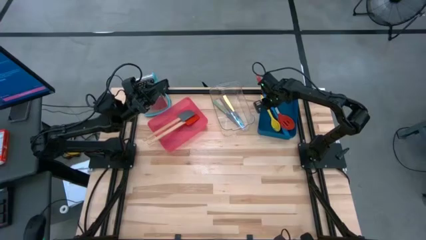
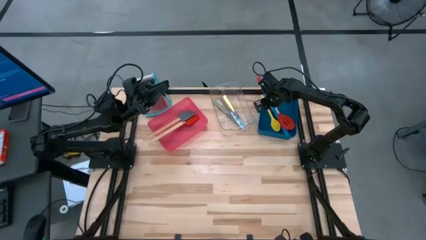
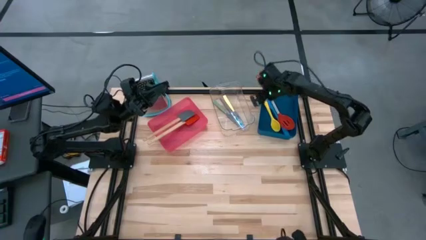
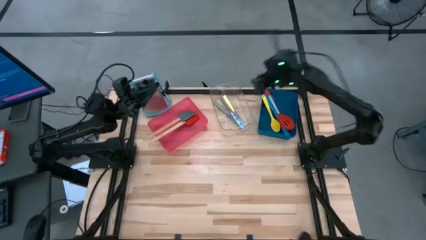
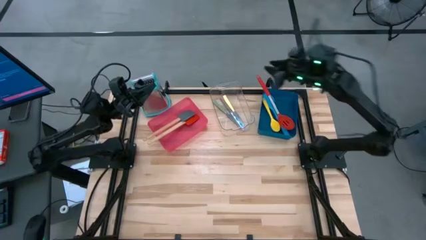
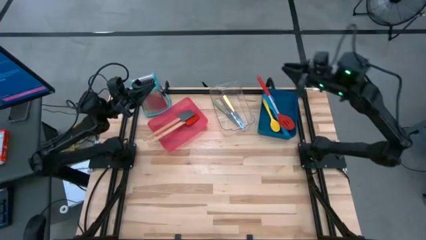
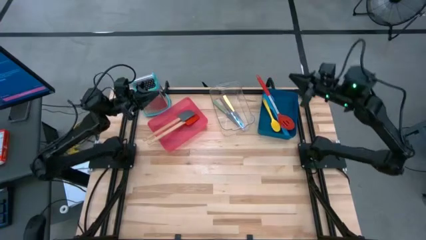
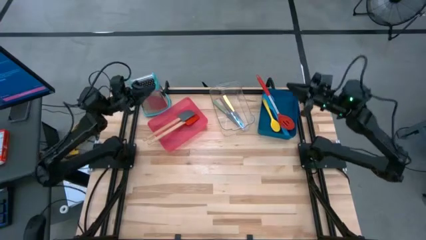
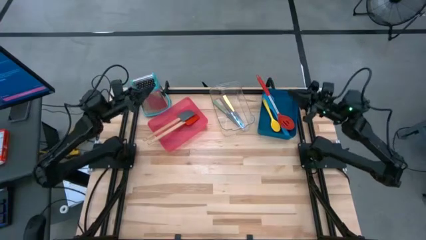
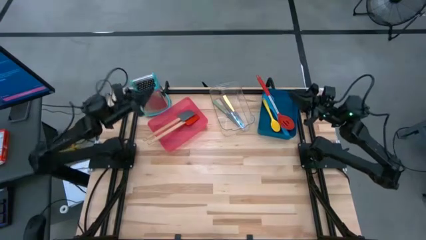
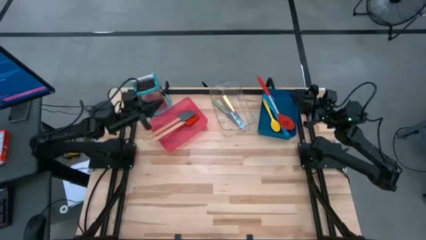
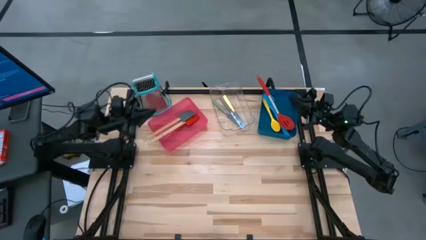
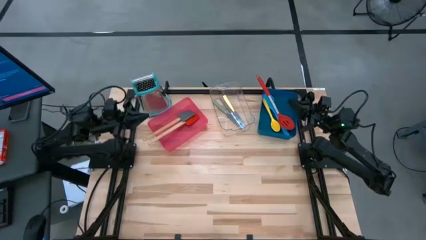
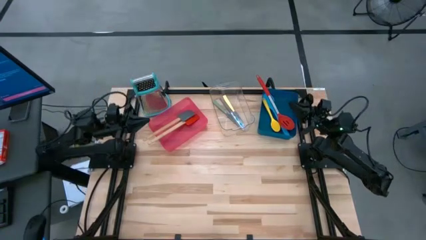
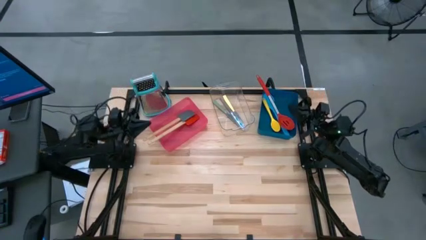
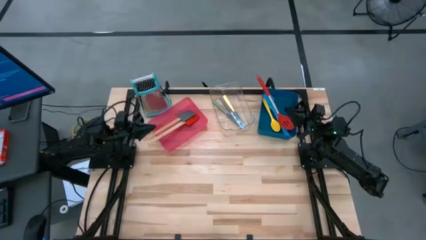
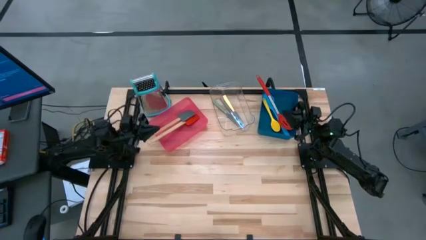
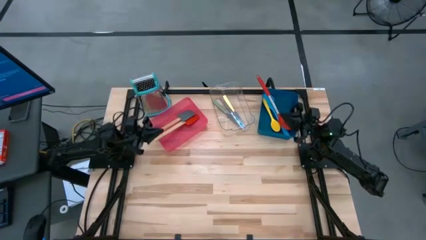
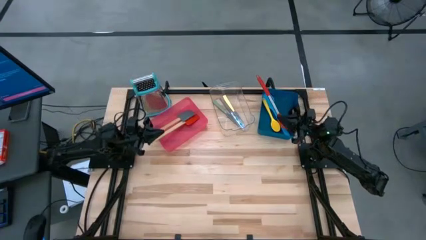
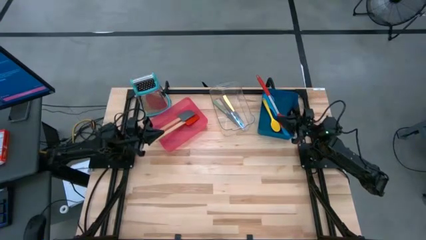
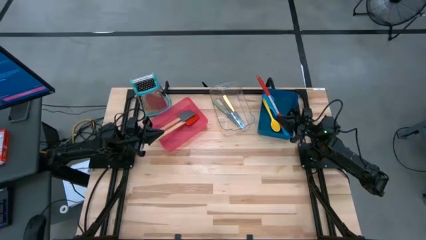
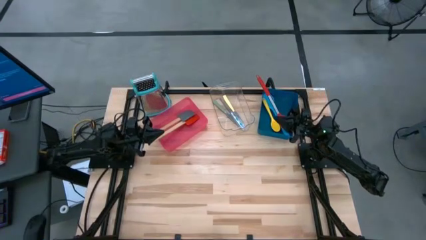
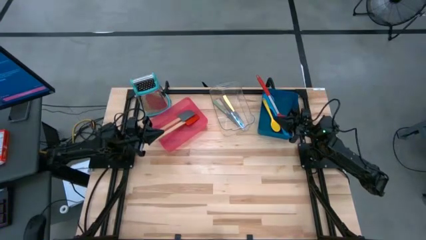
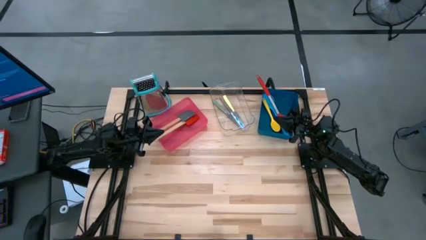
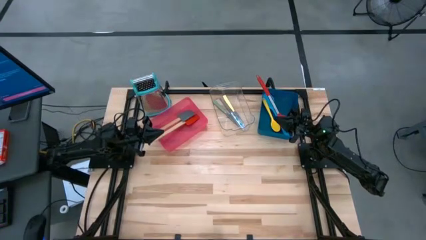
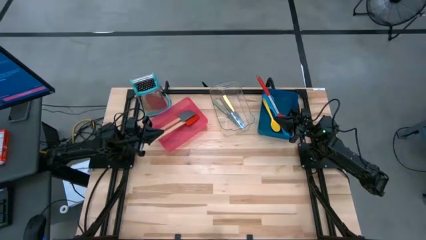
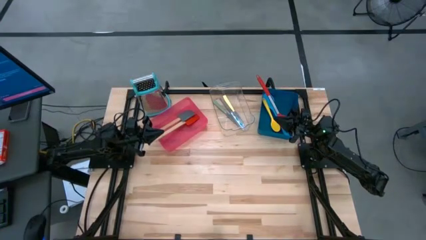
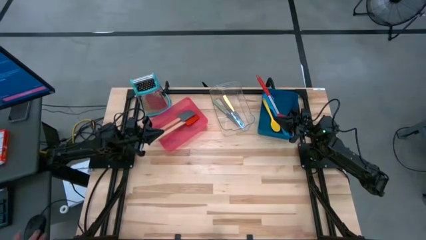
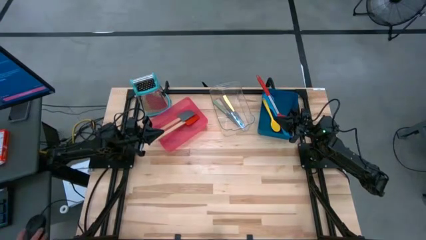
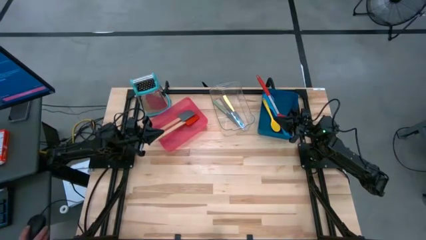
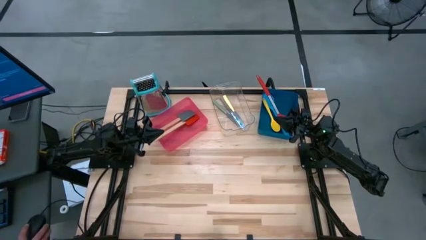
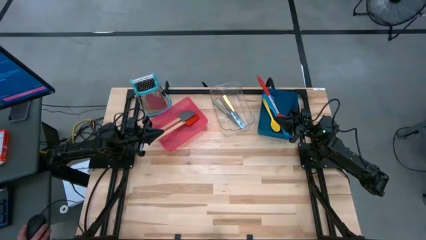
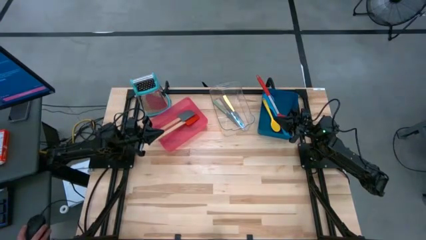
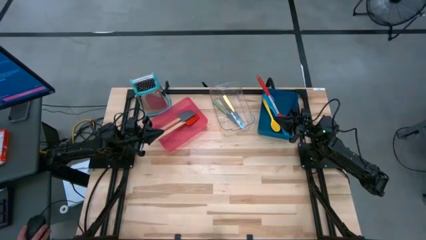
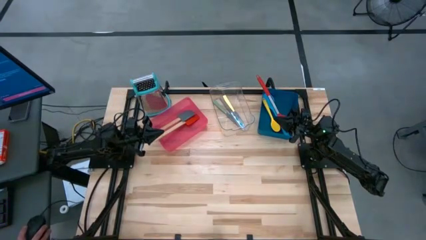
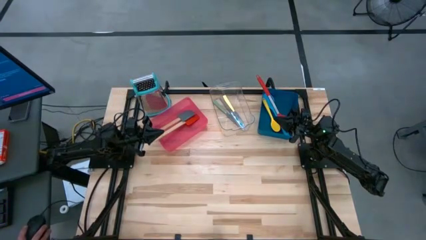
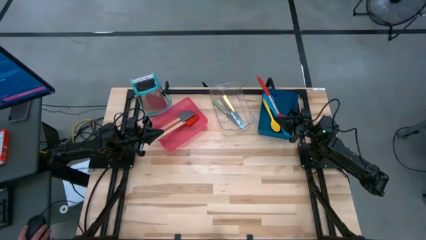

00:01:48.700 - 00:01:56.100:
Task: Pick & Place Kitchen Items
Return to Home Position

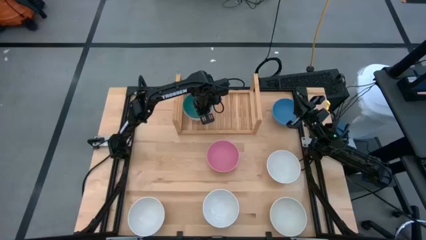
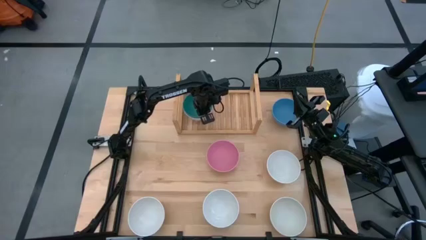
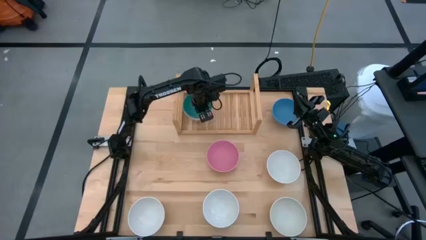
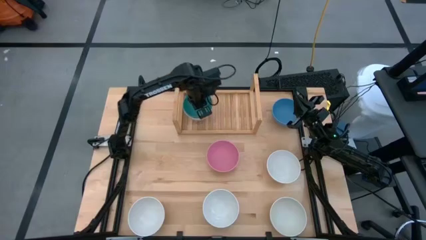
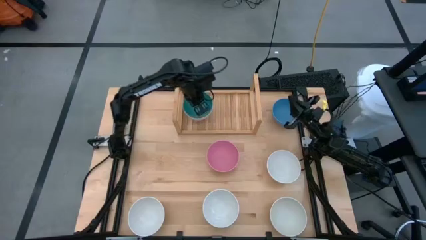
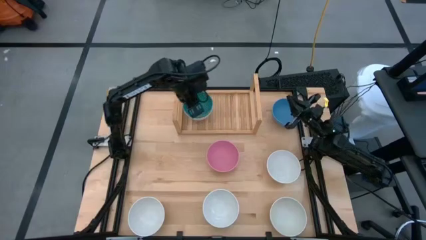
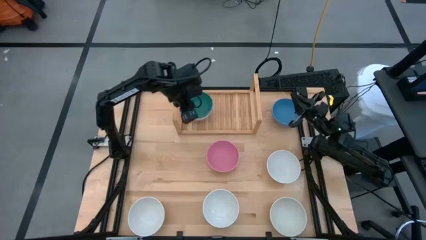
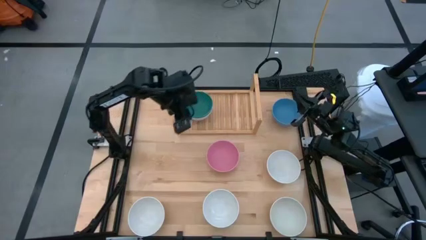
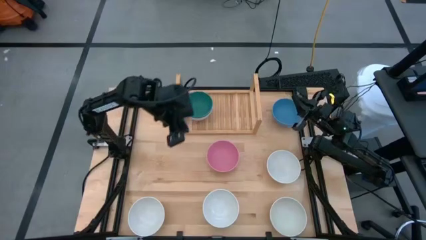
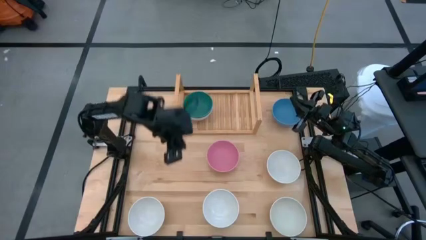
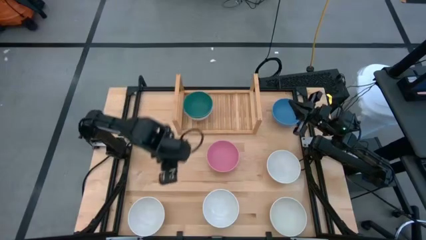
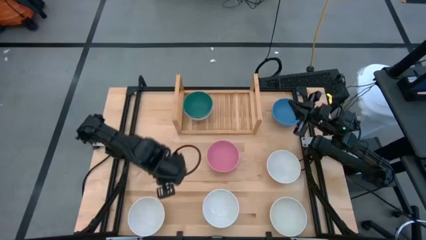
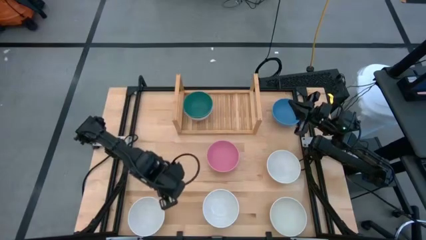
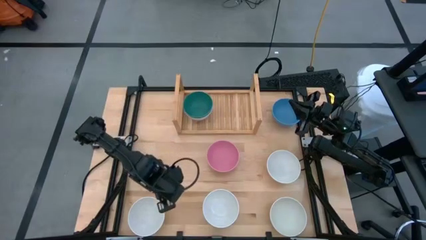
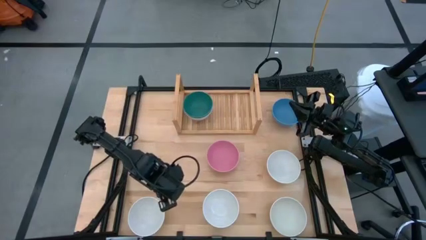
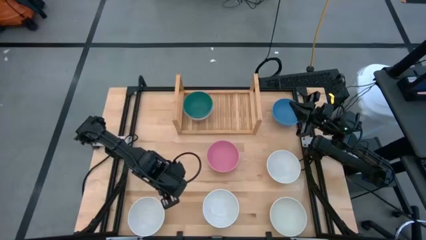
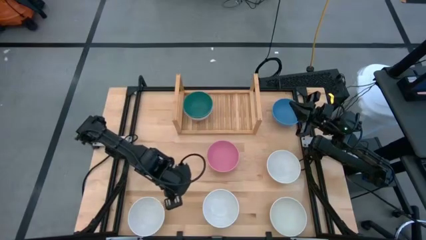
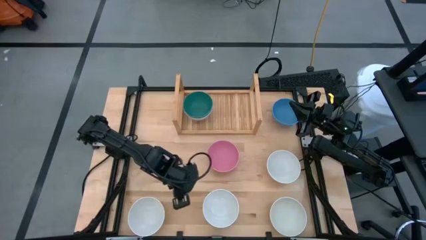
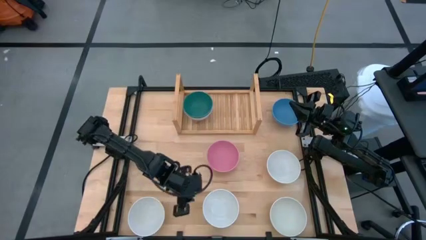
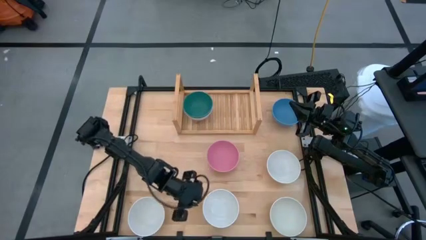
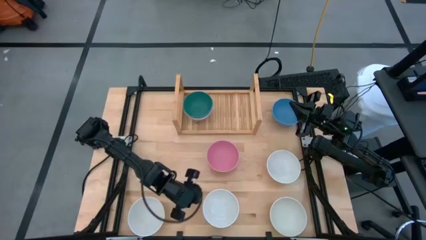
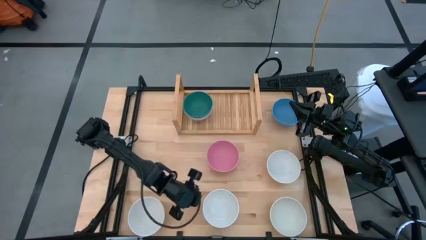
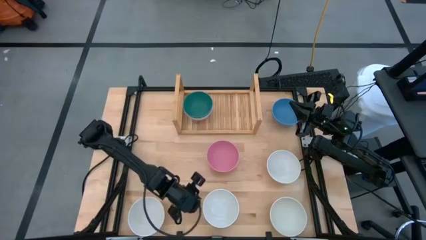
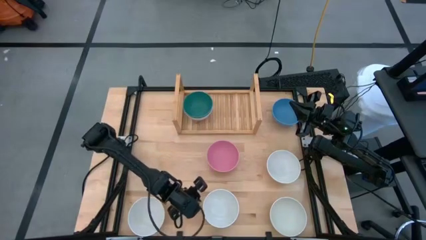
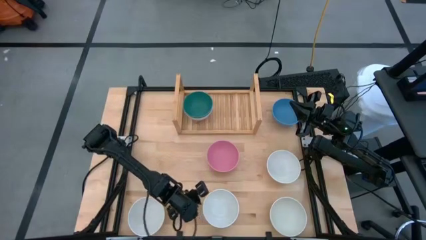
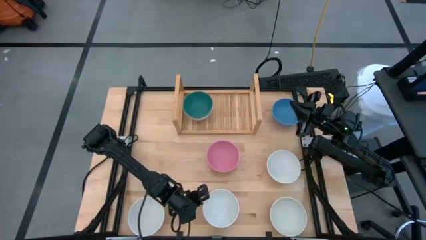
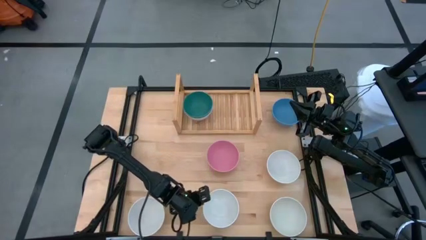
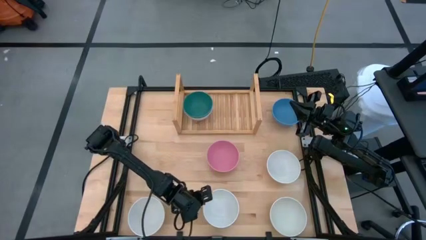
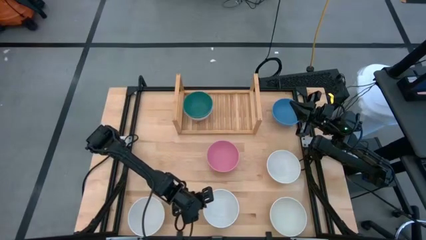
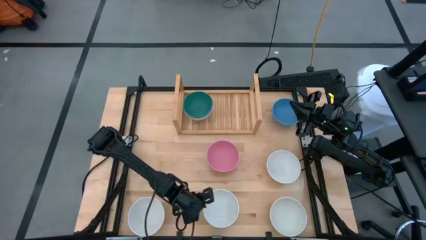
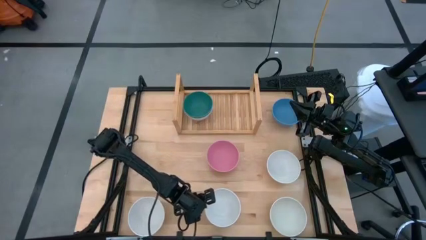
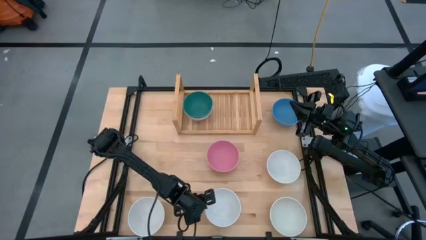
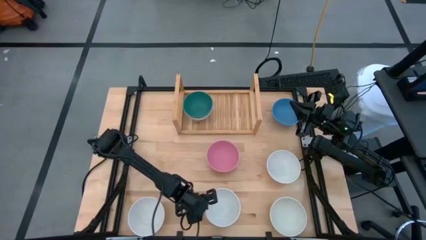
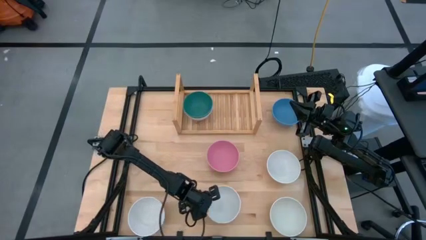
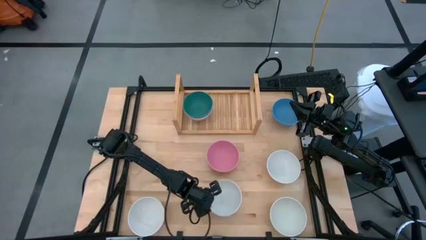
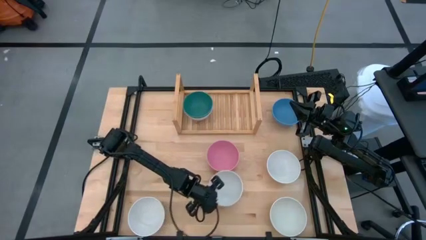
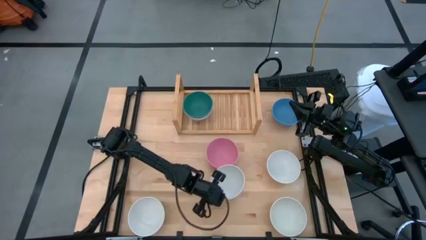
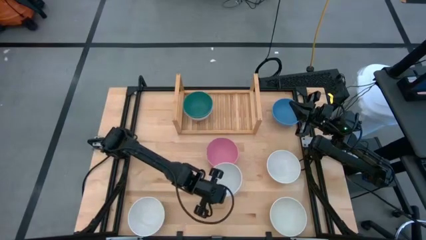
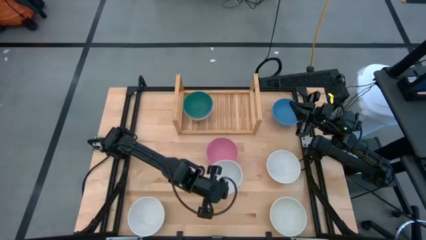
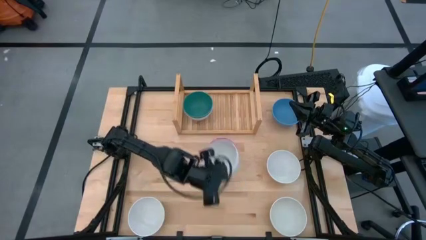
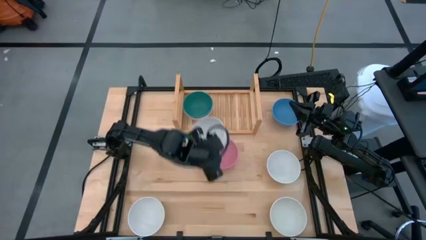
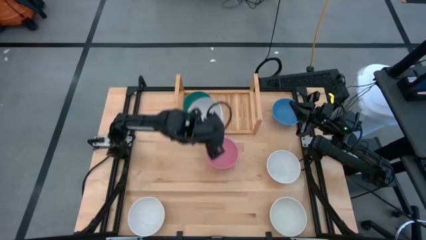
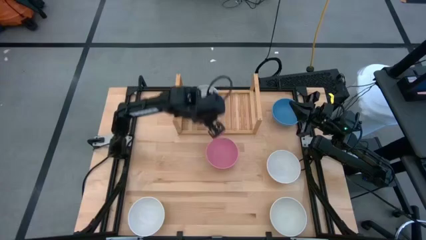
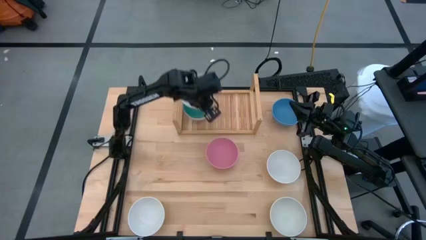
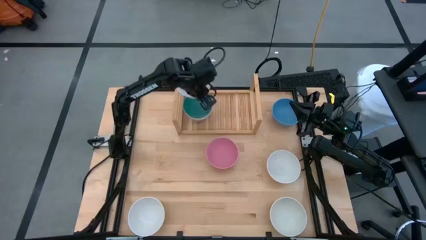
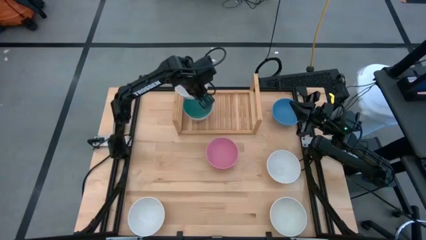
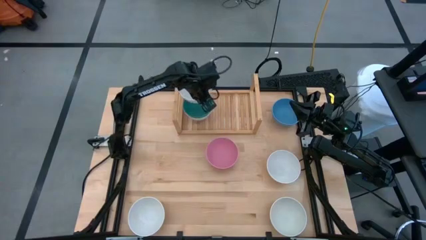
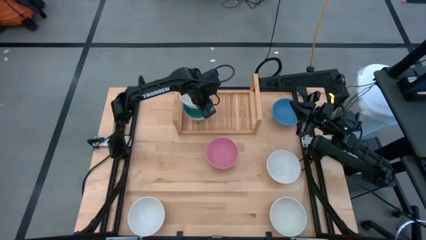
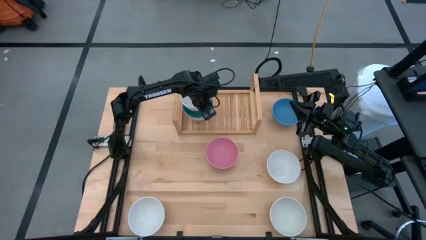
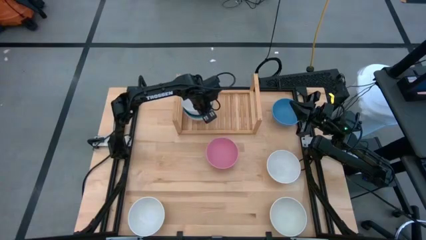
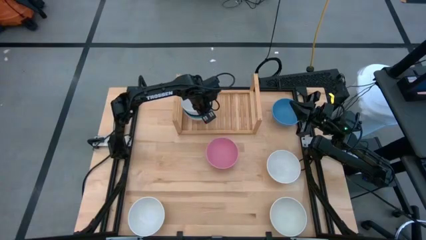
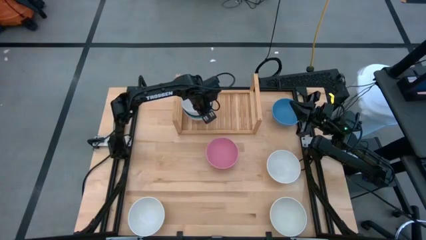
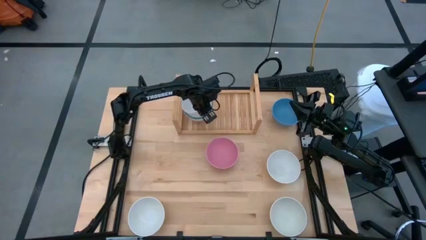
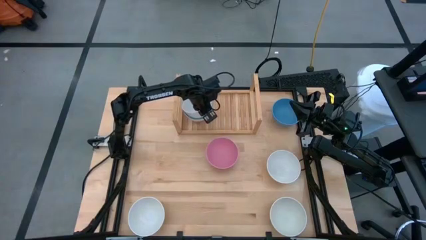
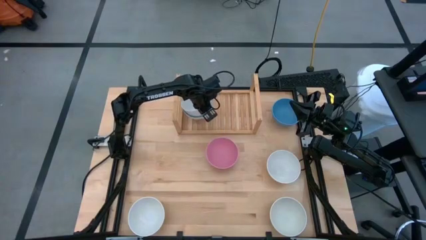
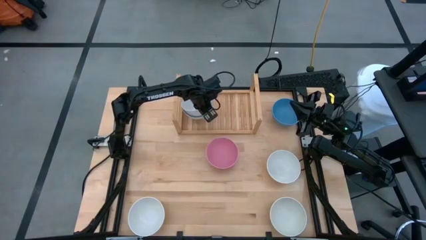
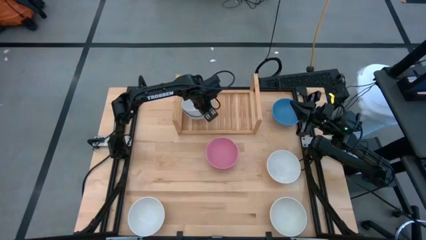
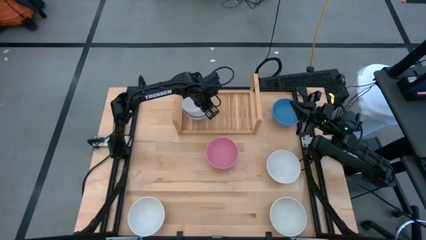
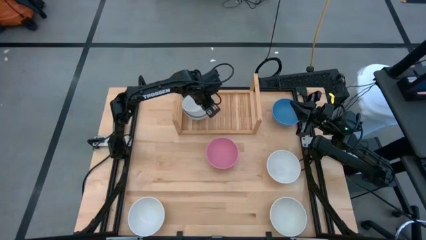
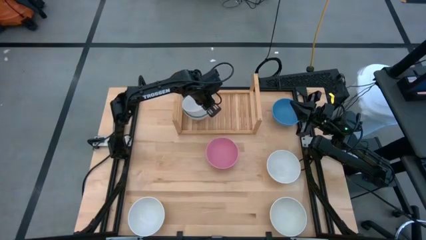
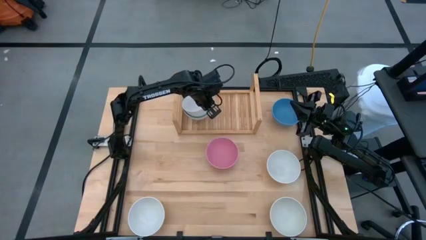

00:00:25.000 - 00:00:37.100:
Task: Place and stack bowls onto a shelf
Stack the white bowl on top of the green bowl on the shelf
